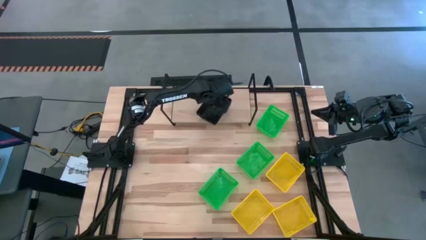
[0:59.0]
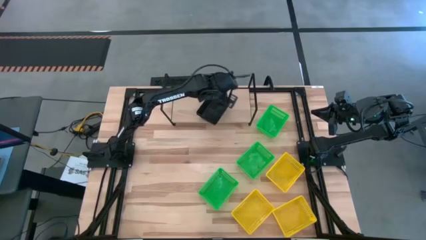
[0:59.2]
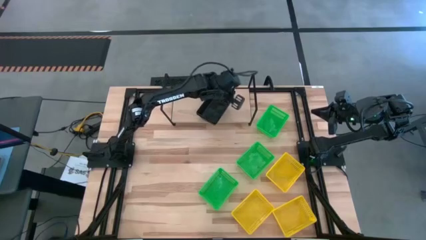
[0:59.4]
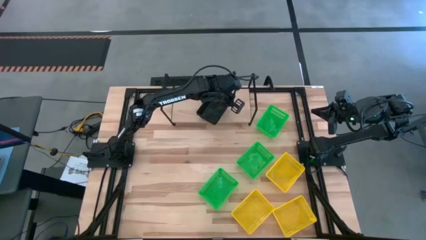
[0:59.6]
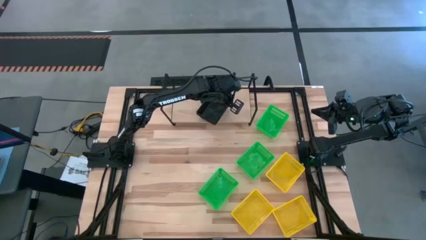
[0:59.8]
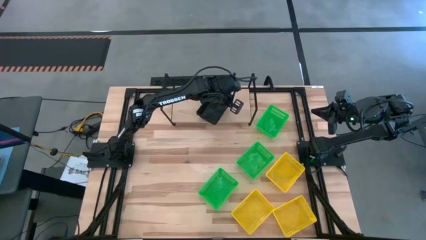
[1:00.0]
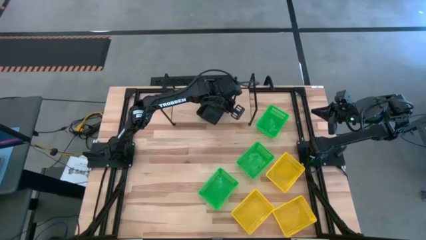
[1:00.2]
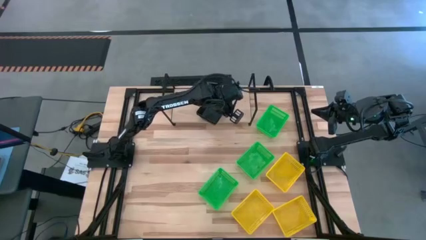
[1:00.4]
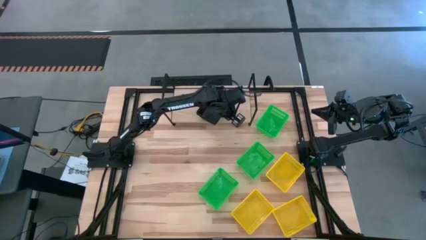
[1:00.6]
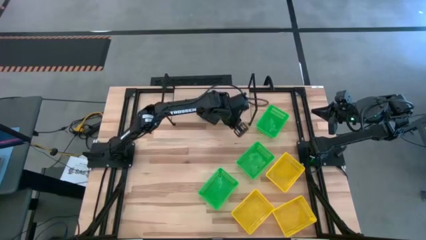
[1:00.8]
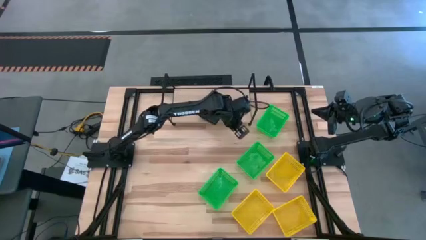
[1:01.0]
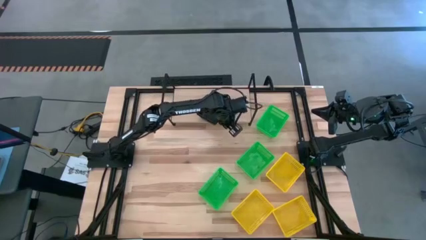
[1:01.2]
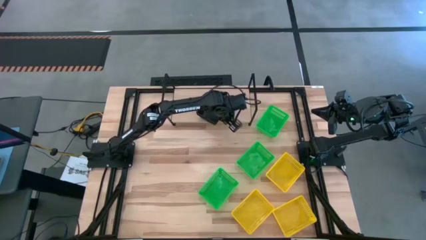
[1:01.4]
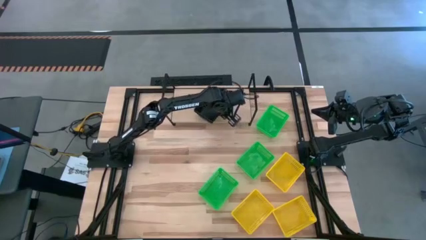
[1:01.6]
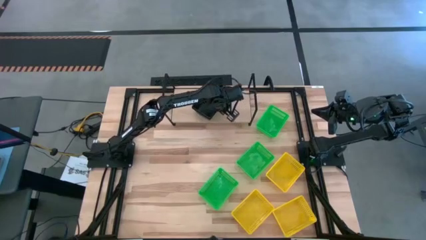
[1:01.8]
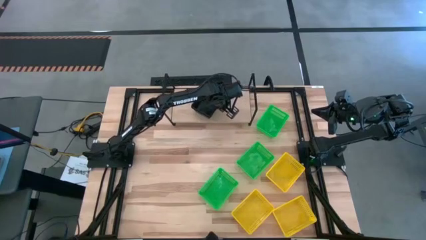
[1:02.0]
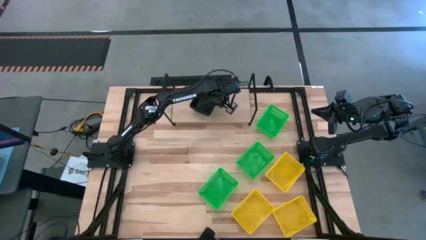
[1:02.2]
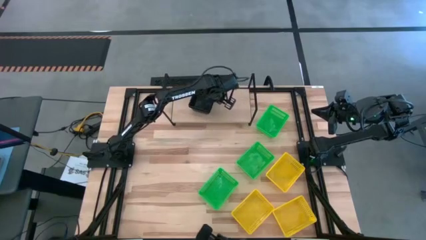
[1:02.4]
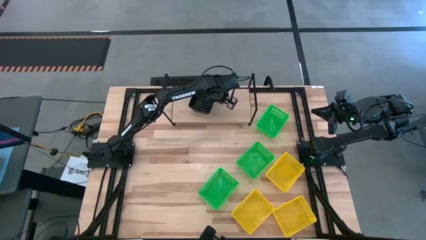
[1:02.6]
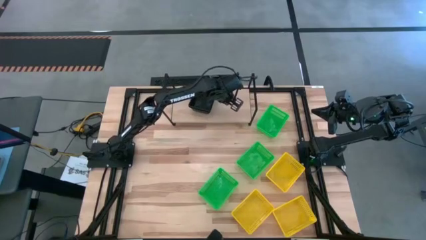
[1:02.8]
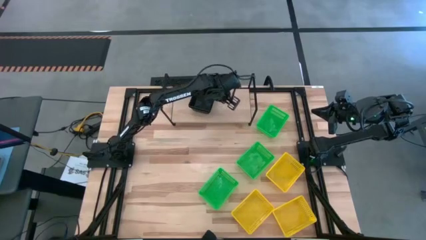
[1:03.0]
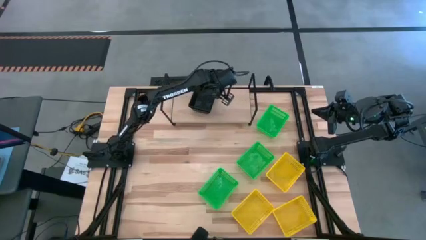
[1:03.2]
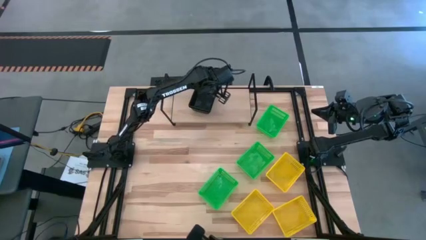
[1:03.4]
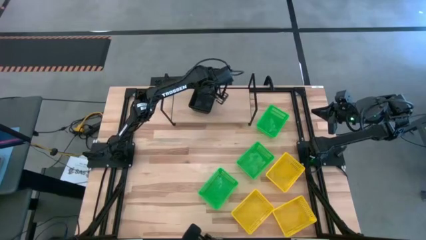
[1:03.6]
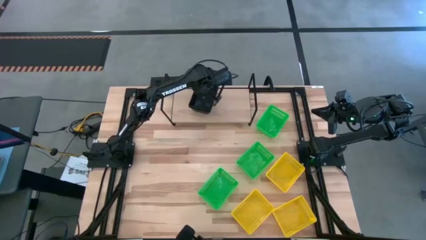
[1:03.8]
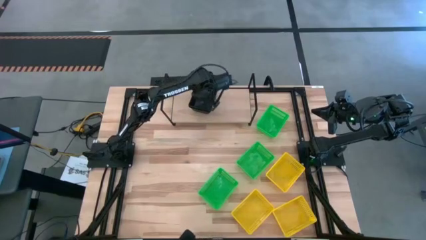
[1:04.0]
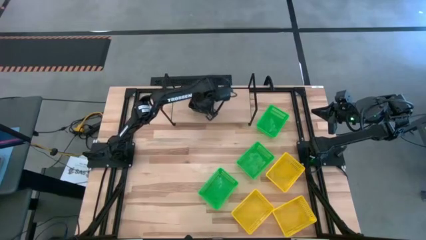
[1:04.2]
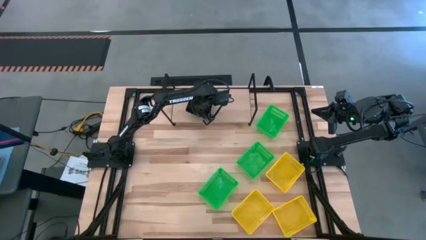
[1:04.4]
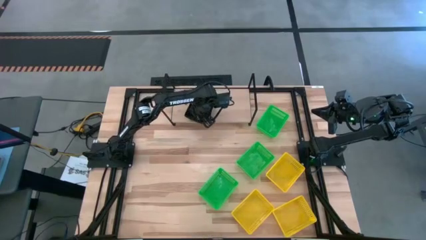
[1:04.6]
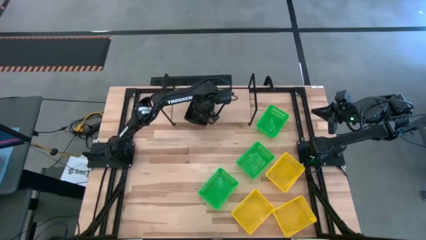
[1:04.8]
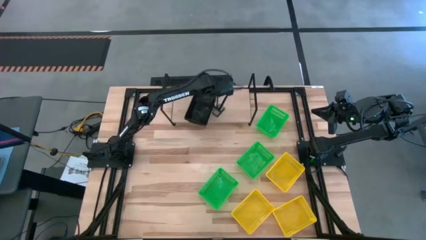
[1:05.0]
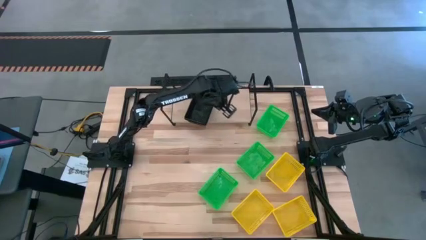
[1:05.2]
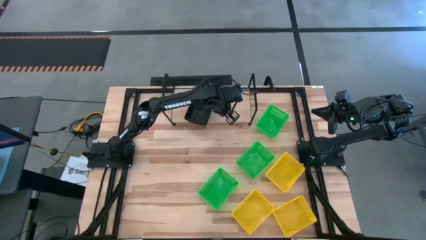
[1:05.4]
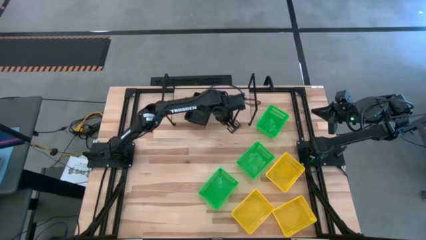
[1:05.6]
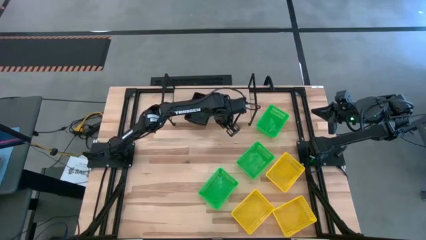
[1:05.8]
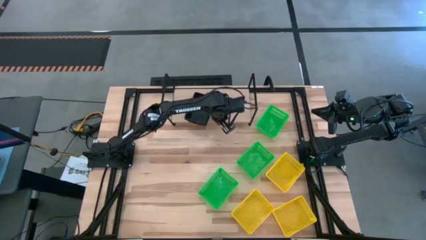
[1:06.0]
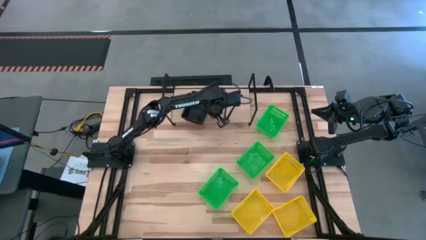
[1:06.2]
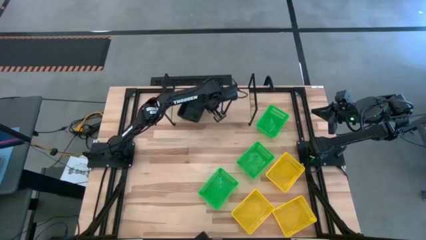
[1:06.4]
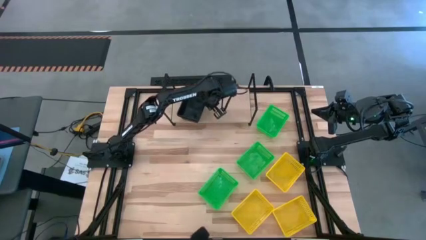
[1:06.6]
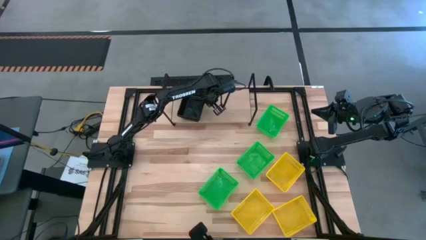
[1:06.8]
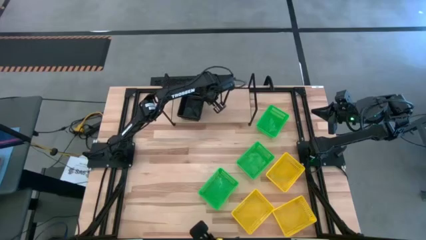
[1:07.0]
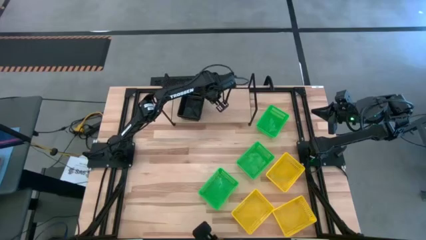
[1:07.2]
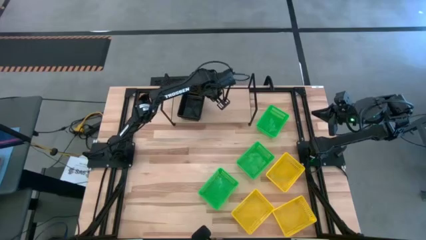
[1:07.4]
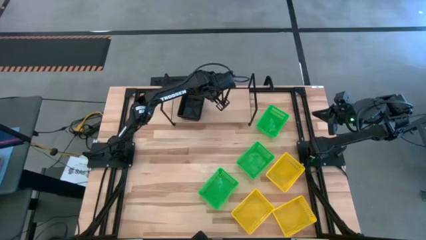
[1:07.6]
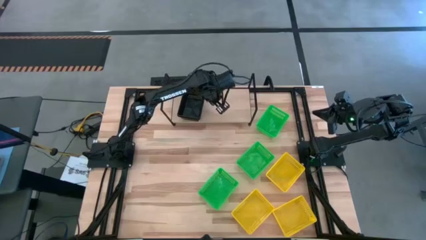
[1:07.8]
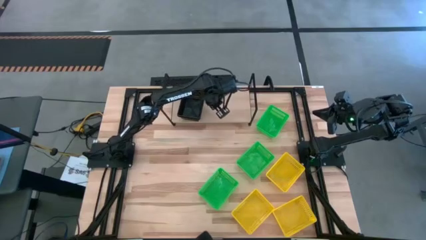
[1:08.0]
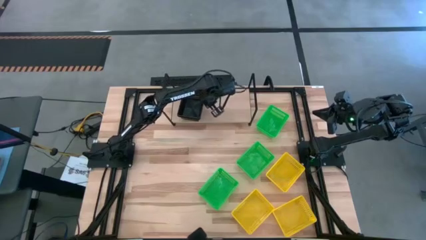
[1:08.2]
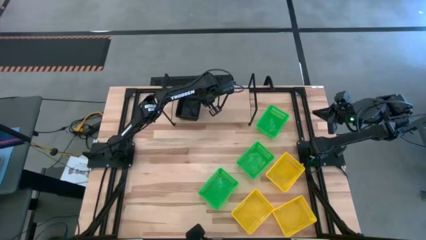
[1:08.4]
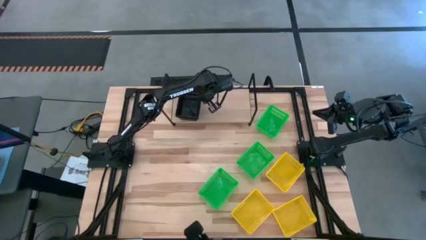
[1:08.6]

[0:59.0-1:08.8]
Task: Stack baskets on shelf by color
Move the black bins to the top left of the shelf

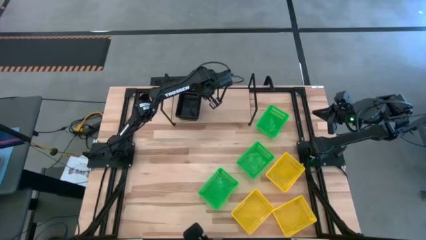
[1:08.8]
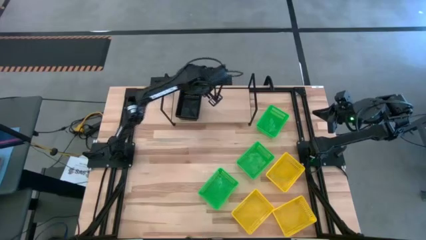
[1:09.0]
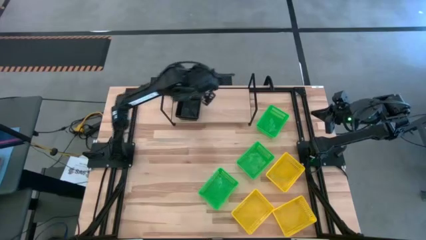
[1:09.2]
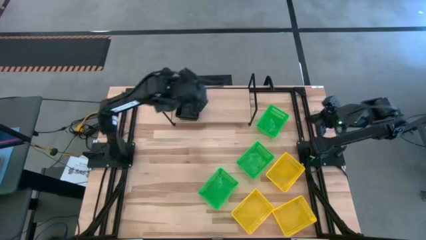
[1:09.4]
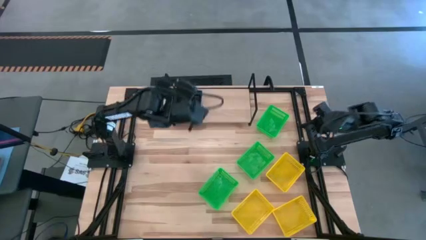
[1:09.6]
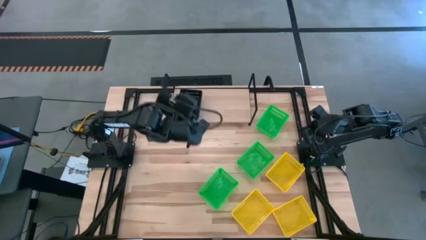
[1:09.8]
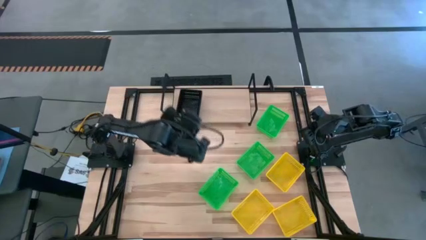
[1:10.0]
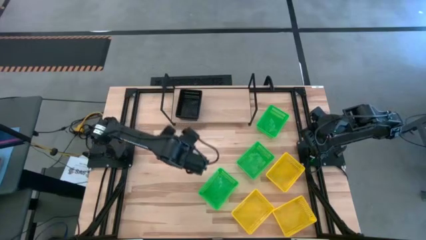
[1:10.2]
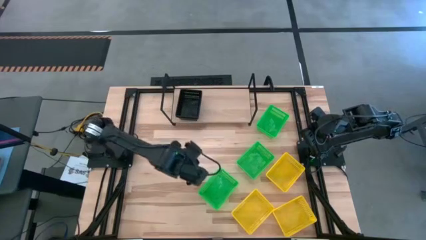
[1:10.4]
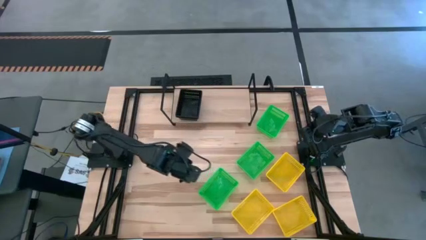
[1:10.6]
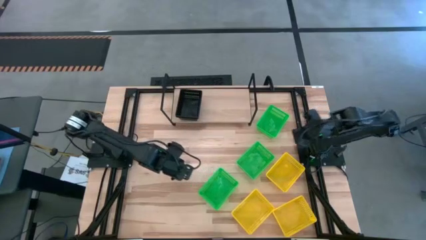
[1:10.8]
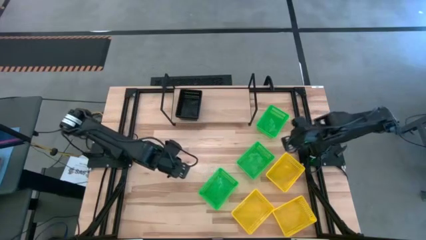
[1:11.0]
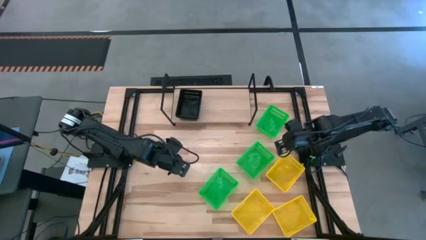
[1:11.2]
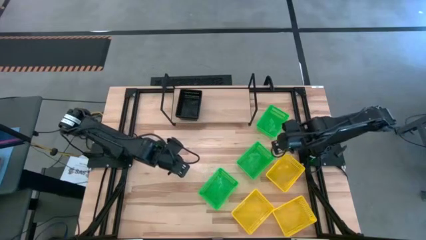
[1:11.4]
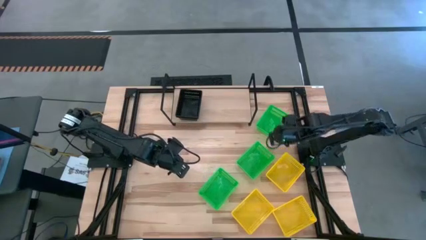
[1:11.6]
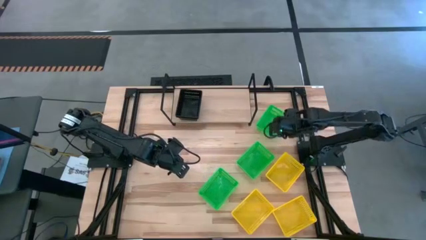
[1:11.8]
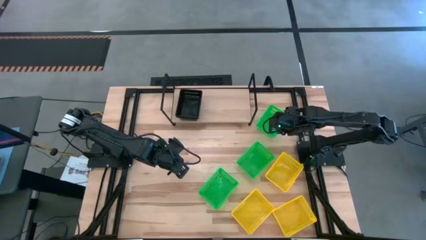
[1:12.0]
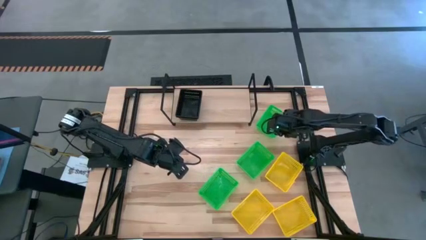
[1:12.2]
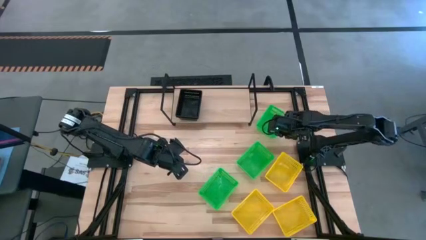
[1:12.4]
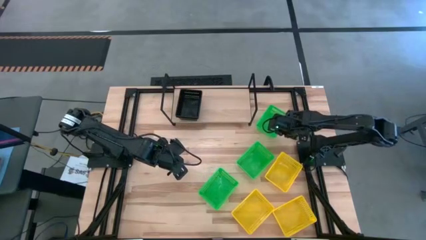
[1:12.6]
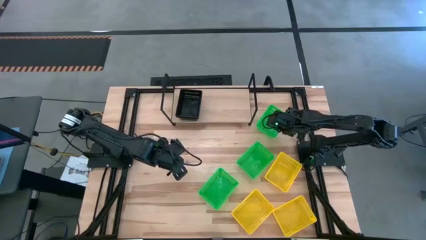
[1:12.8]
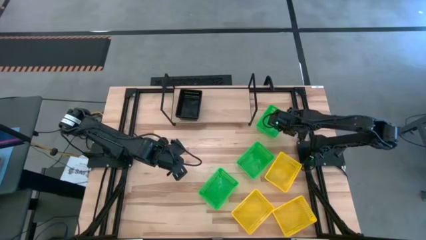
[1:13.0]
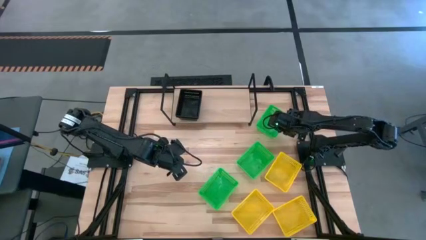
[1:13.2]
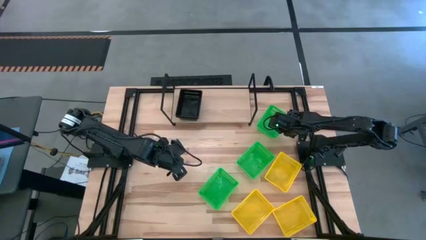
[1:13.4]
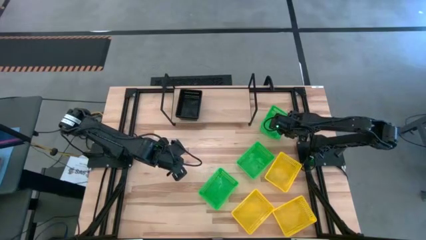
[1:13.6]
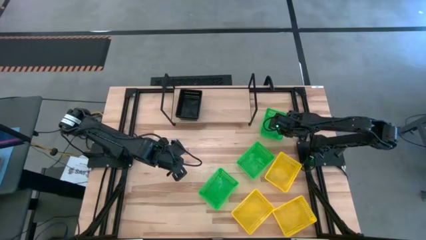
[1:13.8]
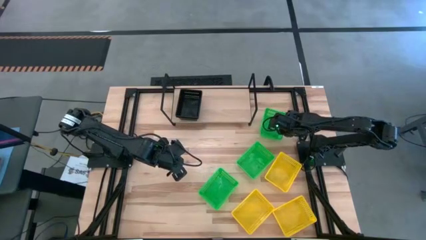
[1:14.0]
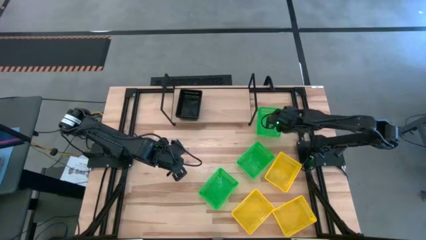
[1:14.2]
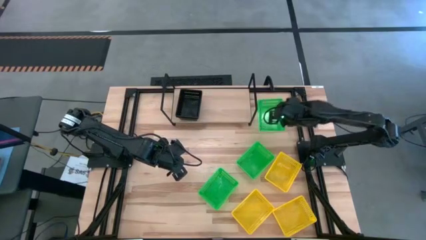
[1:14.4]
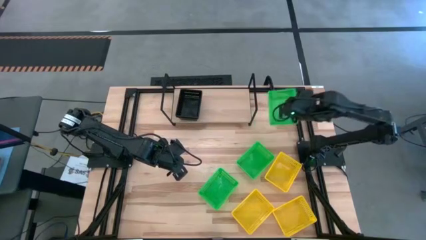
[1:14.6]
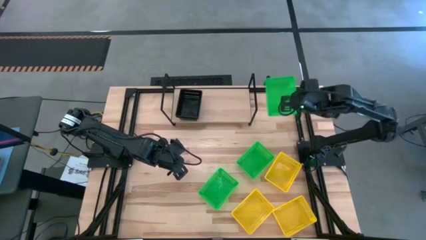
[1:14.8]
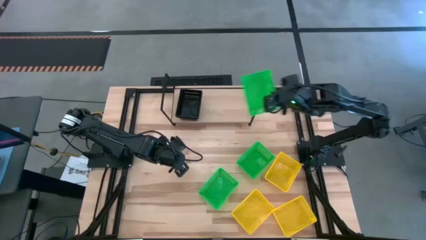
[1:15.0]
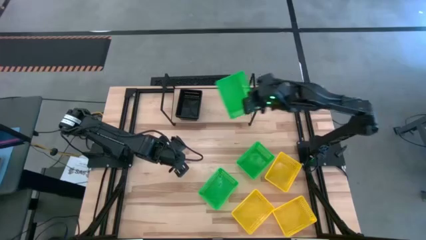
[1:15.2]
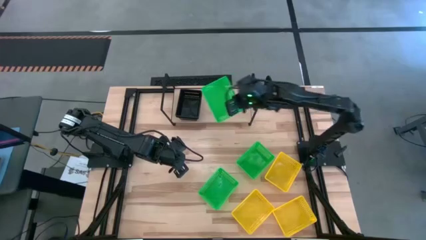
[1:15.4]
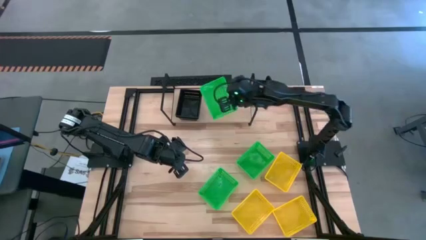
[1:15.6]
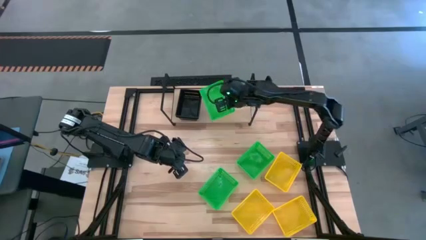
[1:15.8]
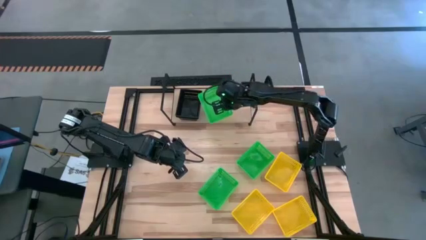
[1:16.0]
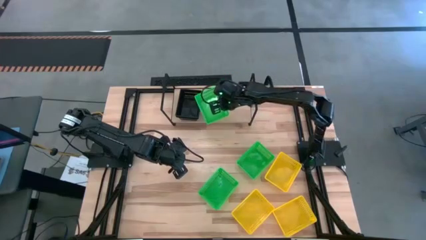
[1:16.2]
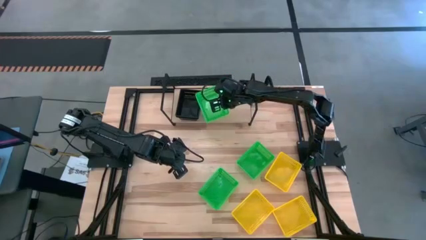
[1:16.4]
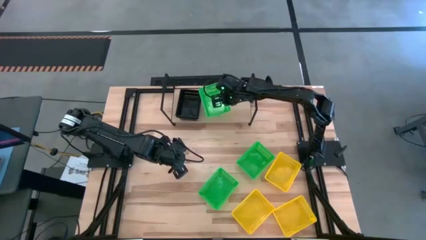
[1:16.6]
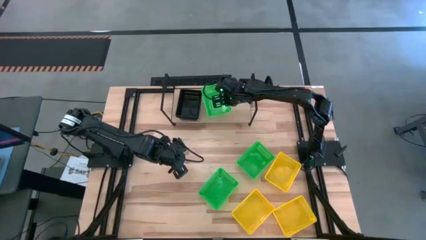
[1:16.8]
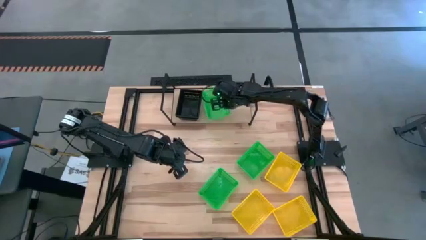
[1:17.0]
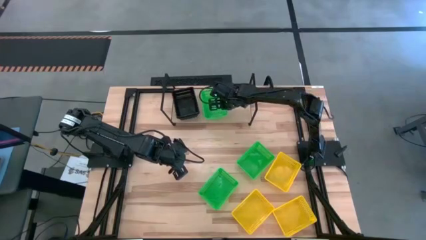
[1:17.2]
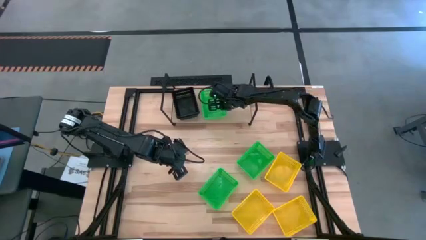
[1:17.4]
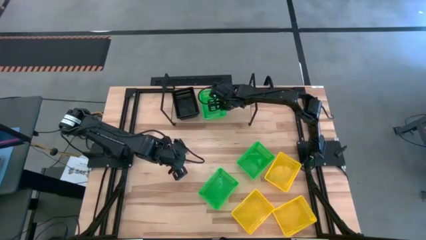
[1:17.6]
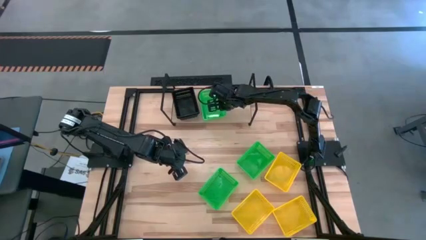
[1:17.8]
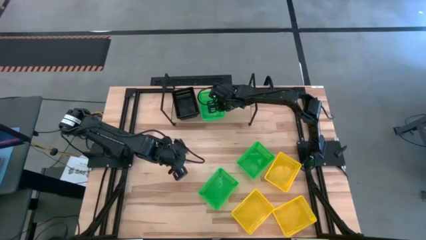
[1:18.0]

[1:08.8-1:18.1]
Put the top green bin on the shelf
